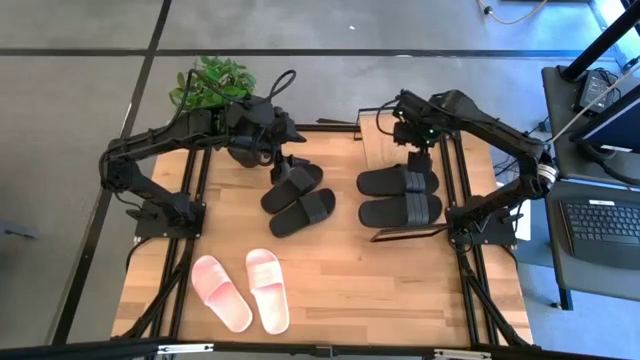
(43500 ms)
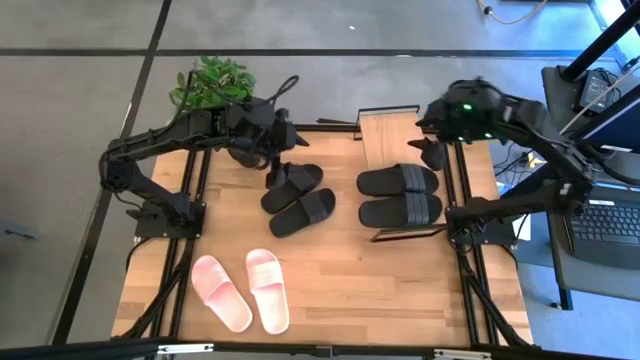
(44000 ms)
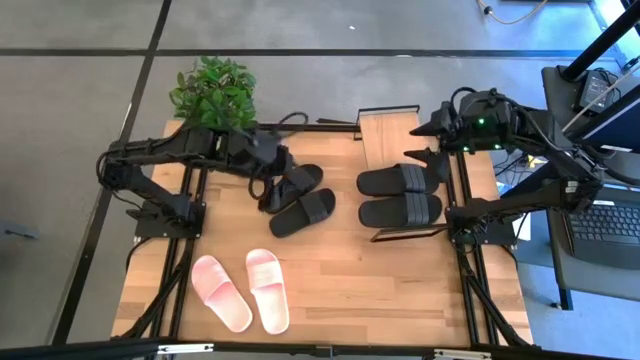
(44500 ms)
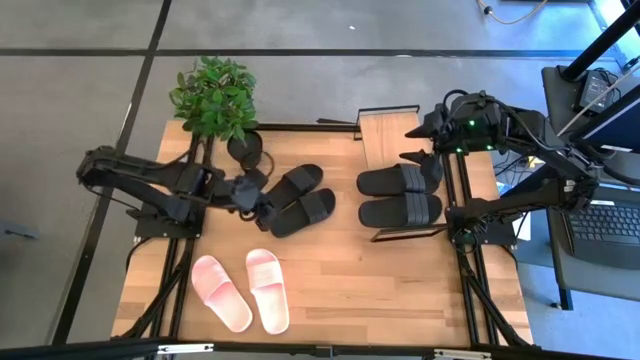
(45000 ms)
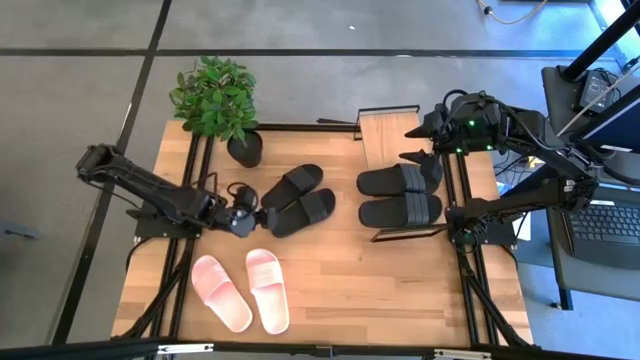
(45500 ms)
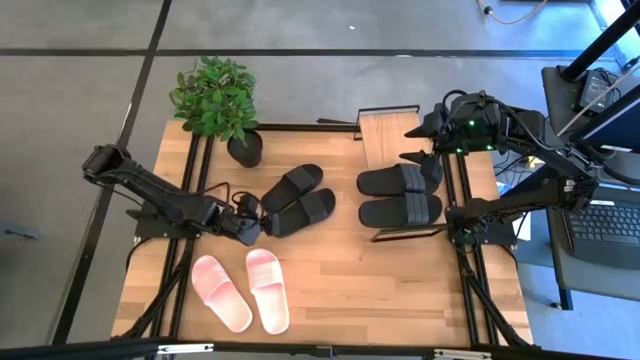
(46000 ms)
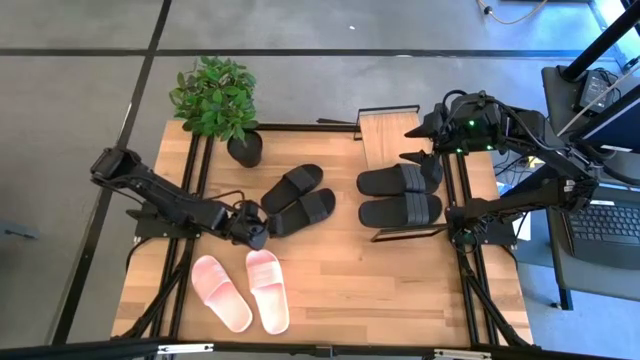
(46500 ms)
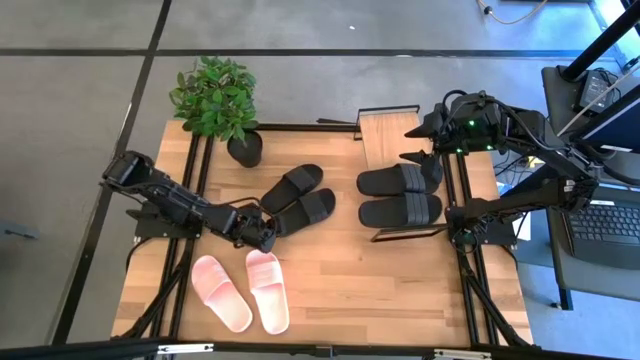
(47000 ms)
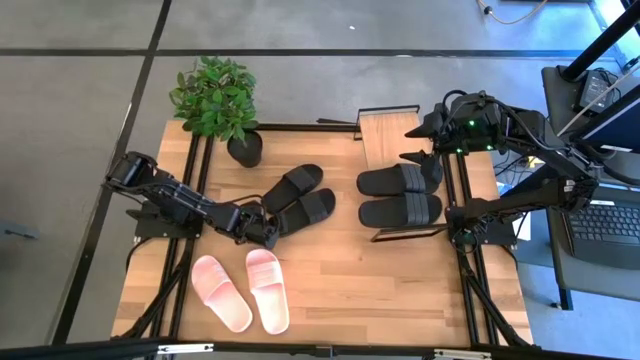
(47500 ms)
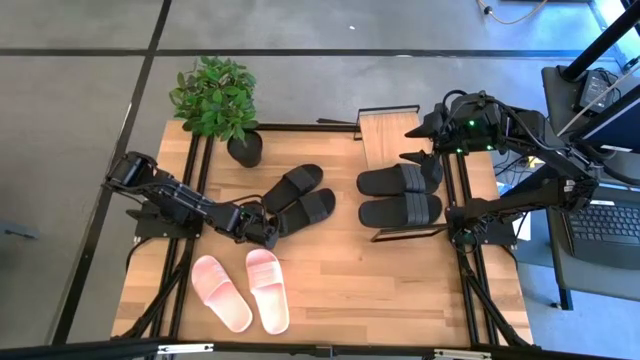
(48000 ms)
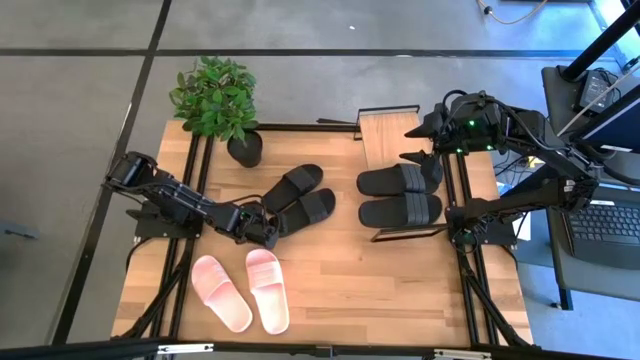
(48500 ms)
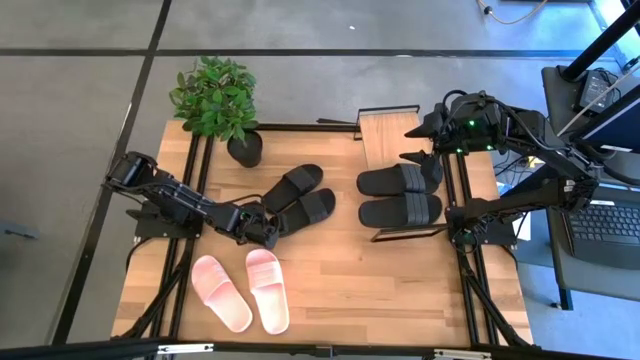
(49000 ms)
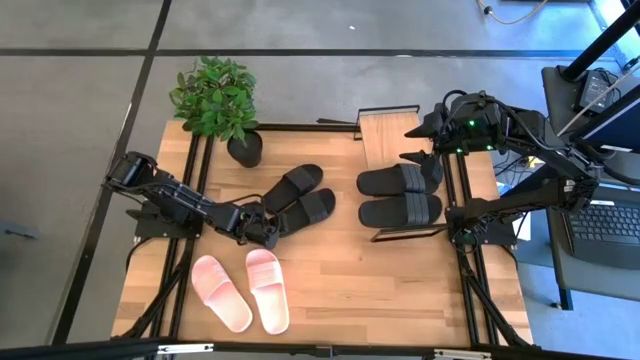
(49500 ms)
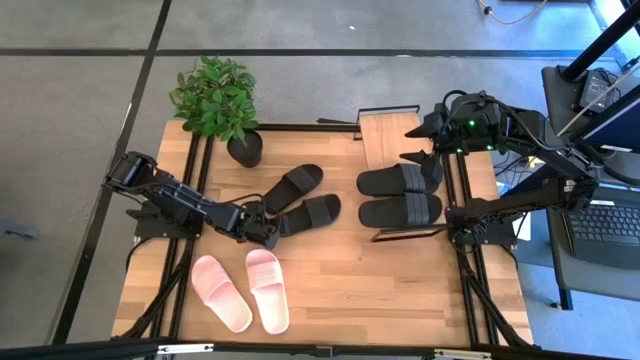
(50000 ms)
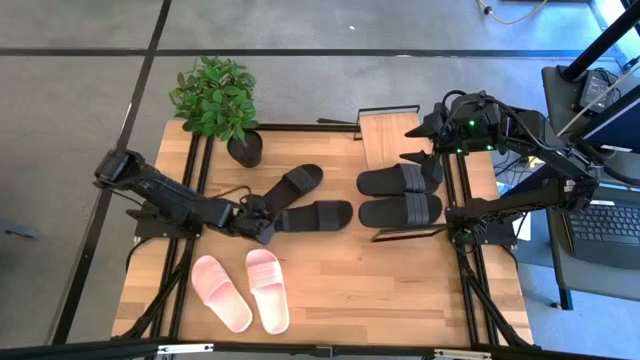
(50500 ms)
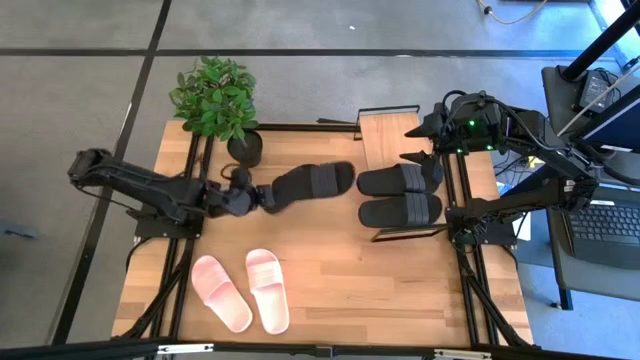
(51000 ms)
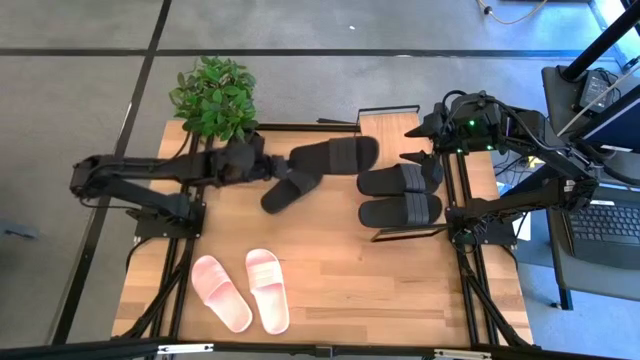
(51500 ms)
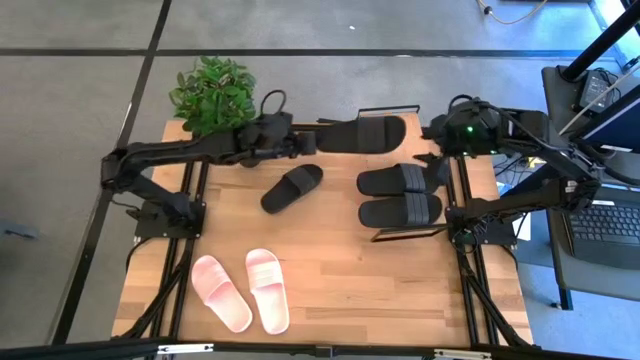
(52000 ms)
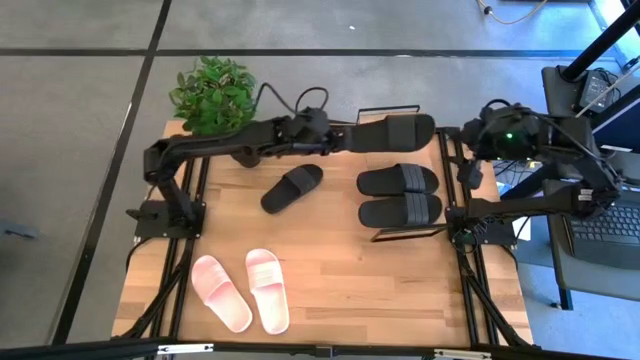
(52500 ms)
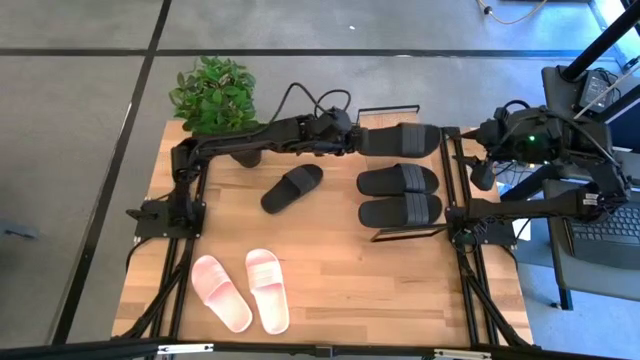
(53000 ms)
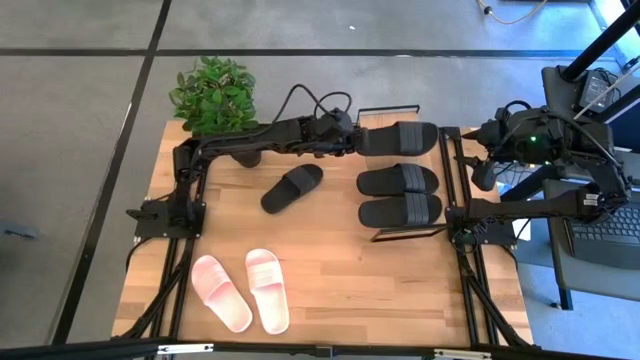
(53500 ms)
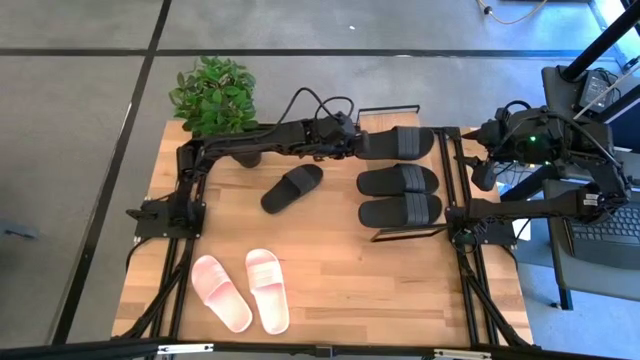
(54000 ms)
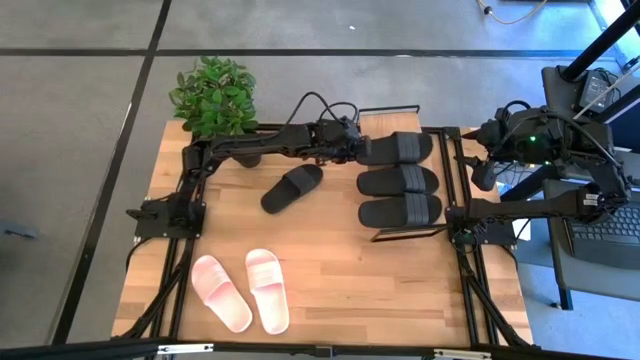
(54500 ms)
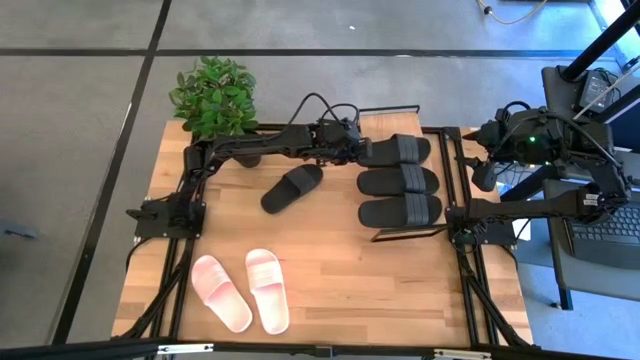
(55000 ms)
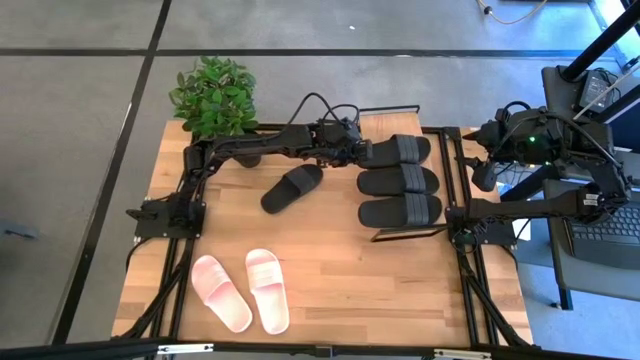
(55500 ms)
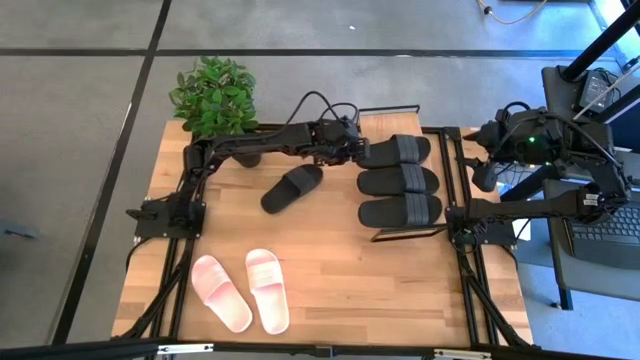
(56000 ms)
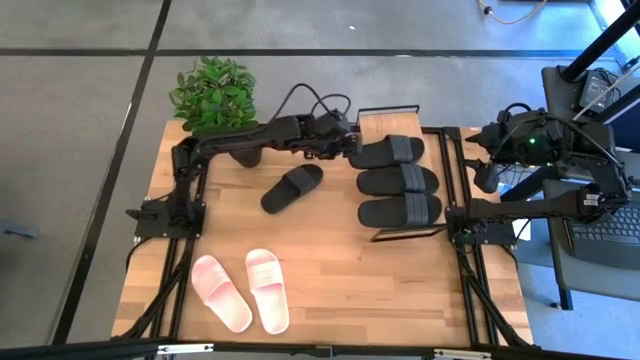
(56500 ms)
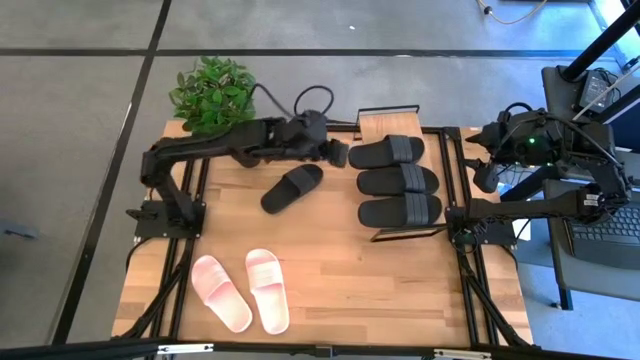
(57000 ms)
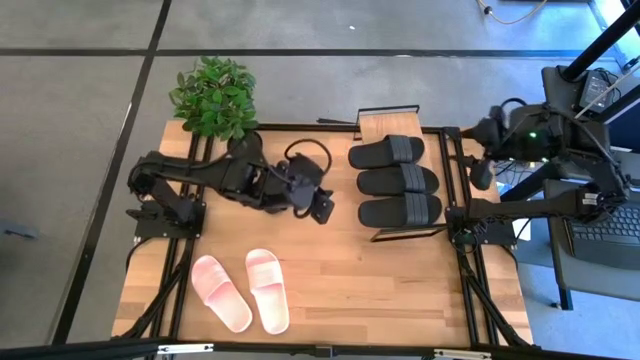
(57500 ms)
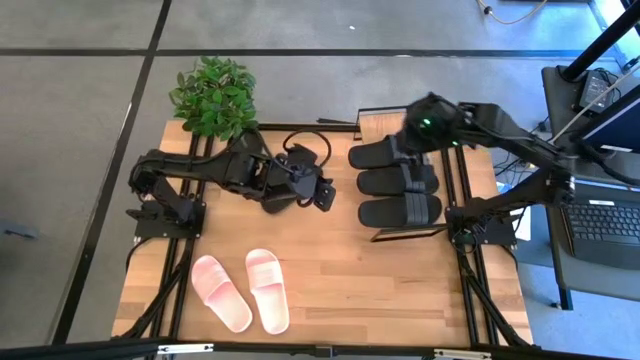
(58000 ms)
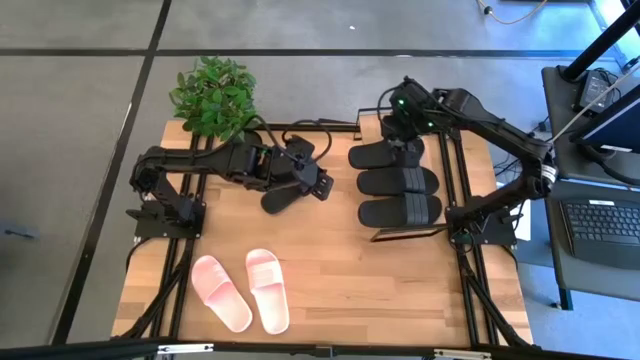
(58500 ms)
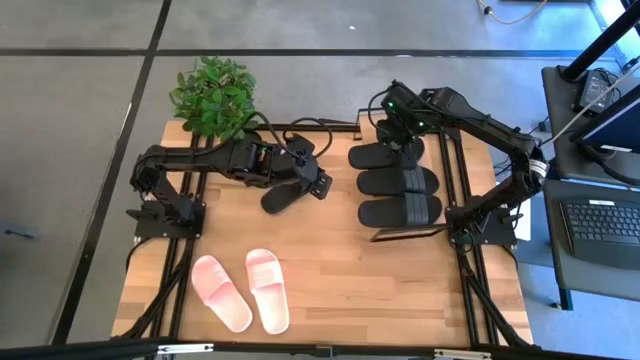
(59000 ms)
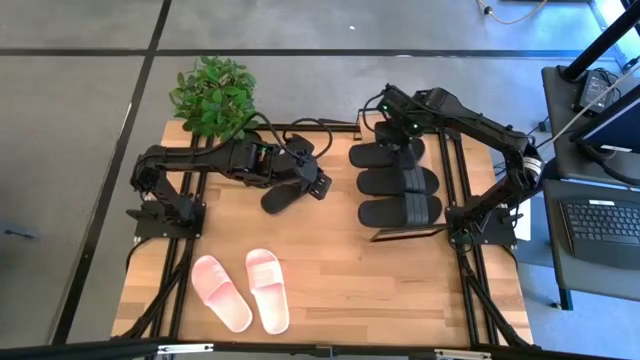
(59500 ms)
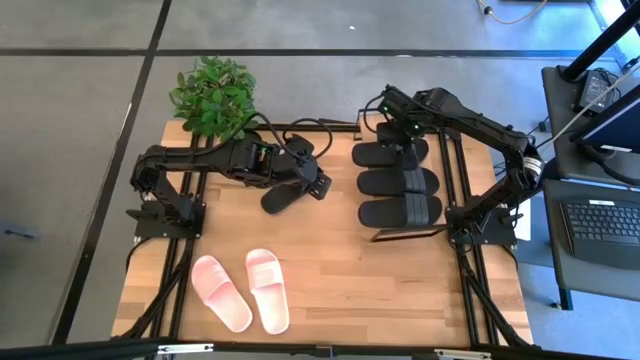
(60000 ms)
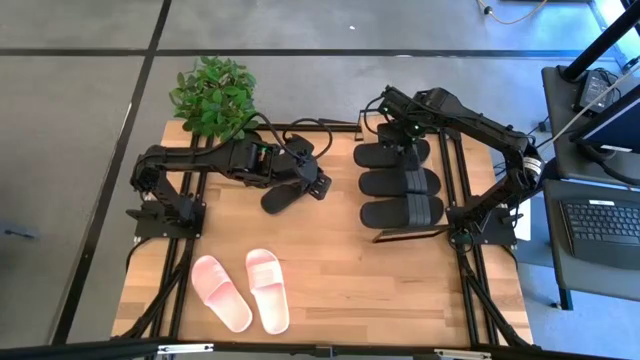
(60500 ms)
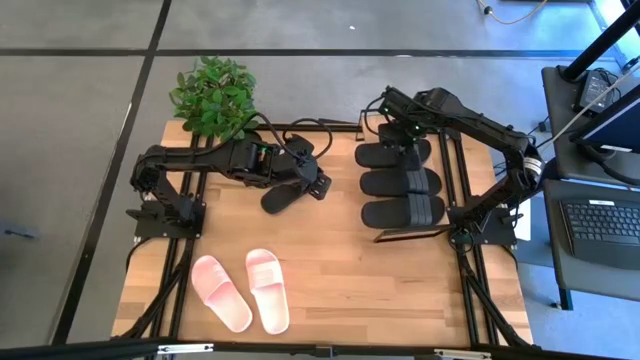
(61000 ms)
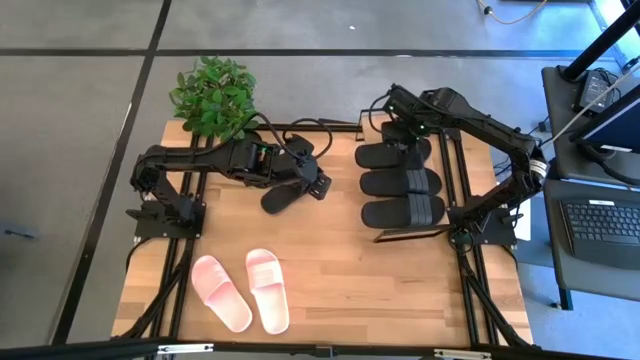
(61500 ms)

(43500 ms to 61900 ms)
Task: Pick and place slides into the shelf
Put the black slide on the shelf
